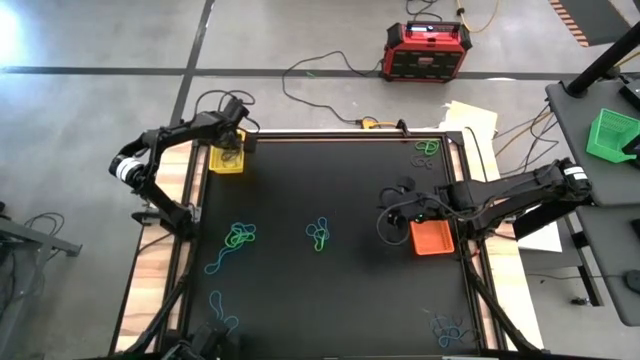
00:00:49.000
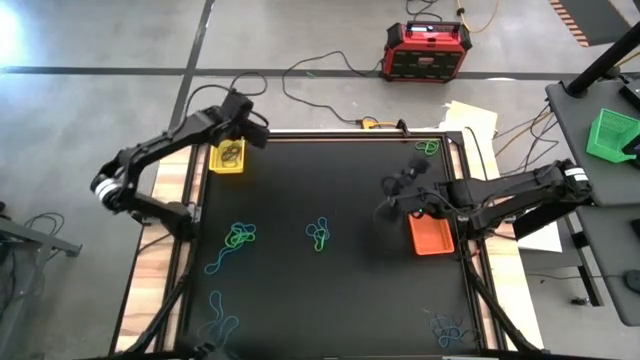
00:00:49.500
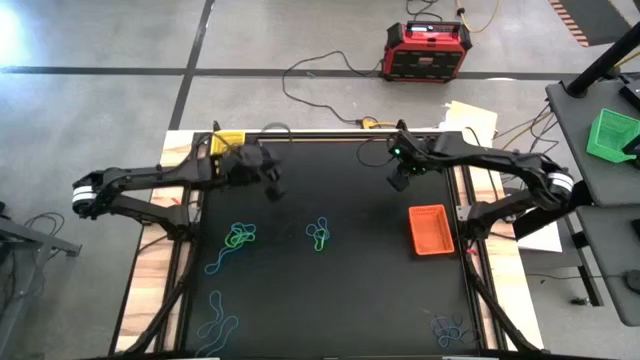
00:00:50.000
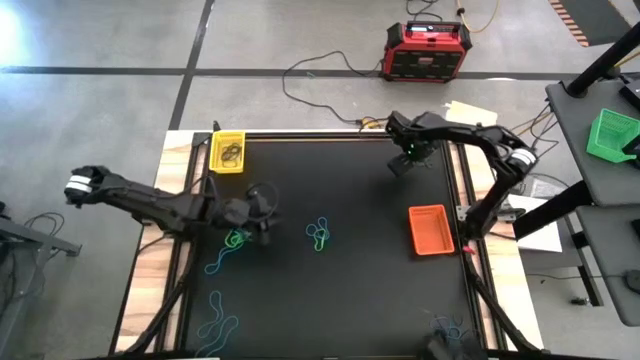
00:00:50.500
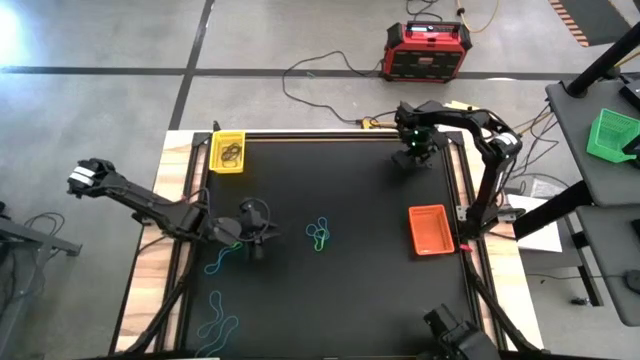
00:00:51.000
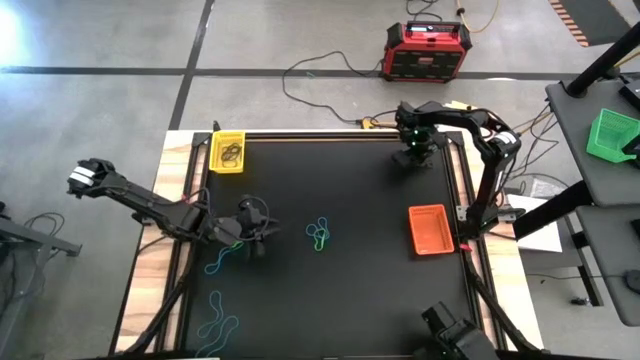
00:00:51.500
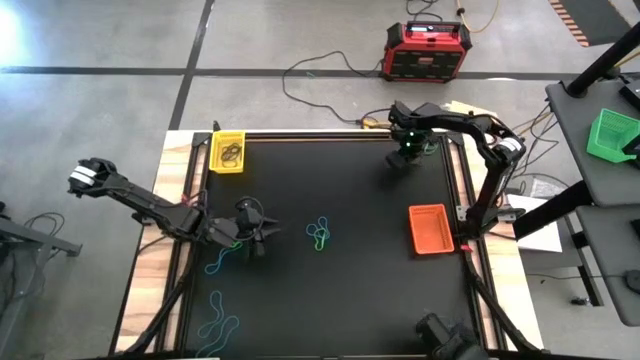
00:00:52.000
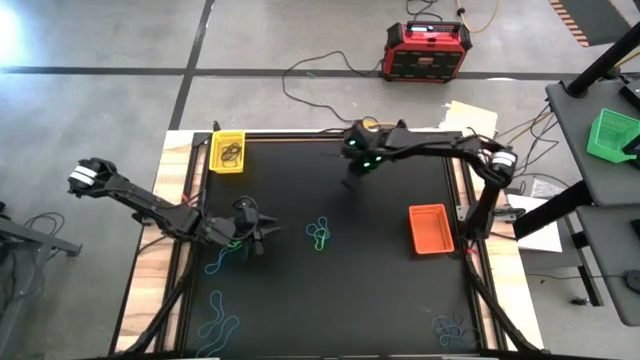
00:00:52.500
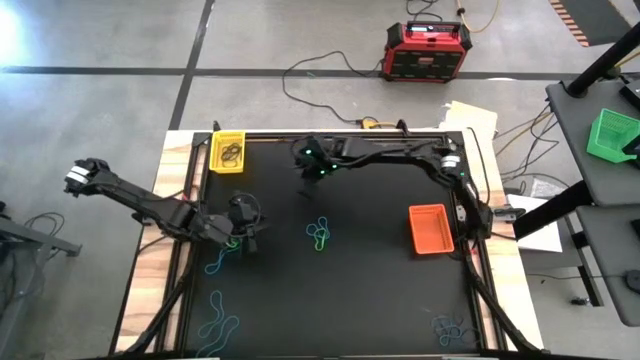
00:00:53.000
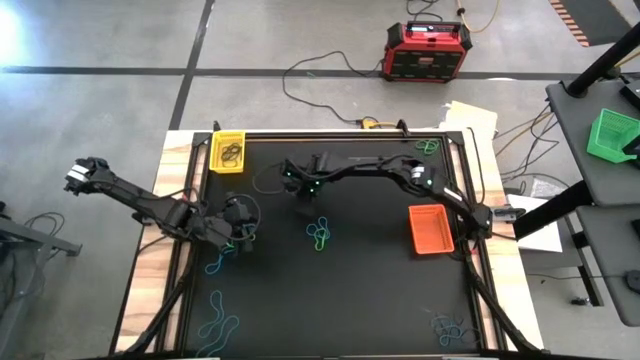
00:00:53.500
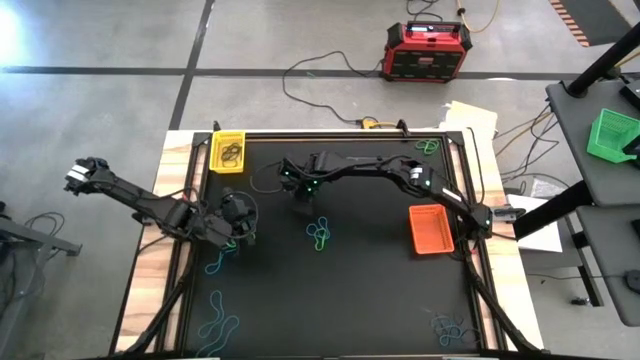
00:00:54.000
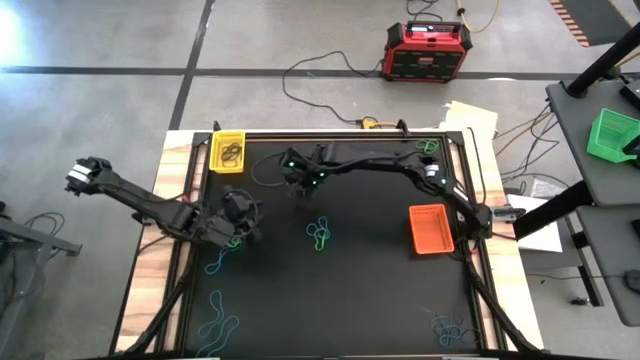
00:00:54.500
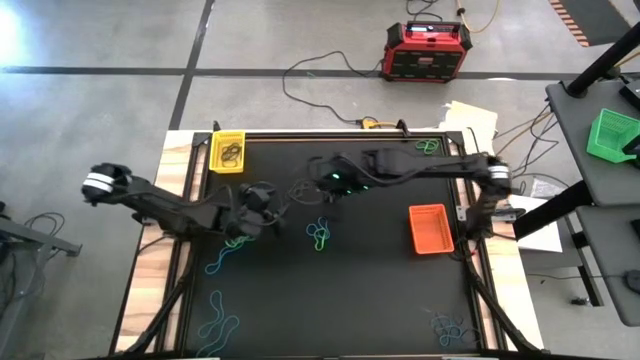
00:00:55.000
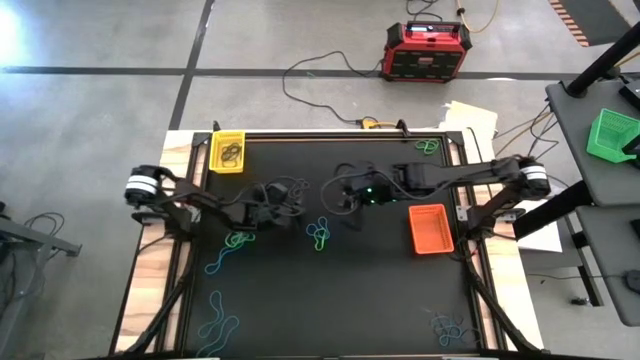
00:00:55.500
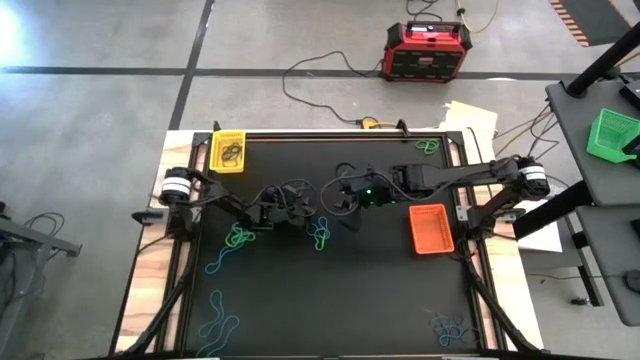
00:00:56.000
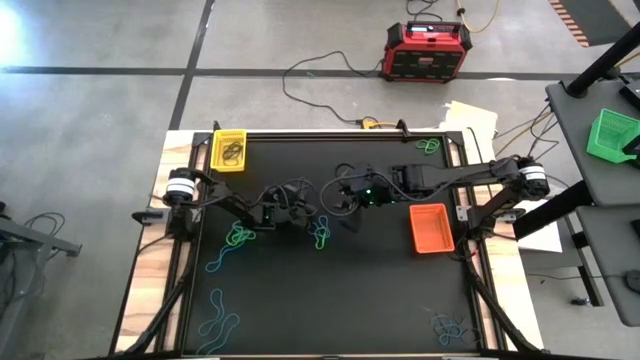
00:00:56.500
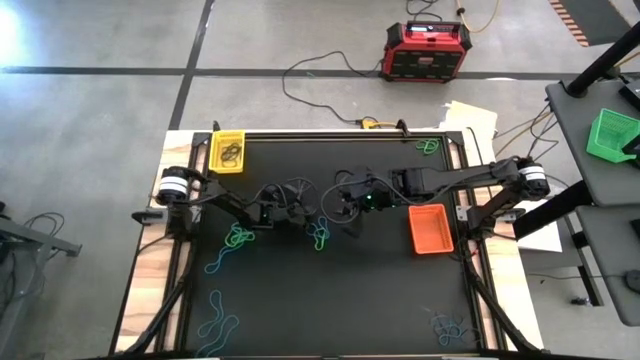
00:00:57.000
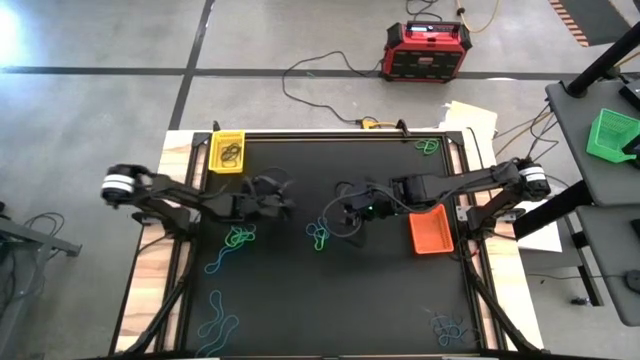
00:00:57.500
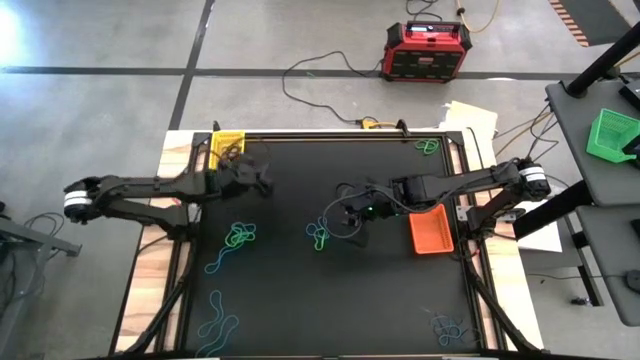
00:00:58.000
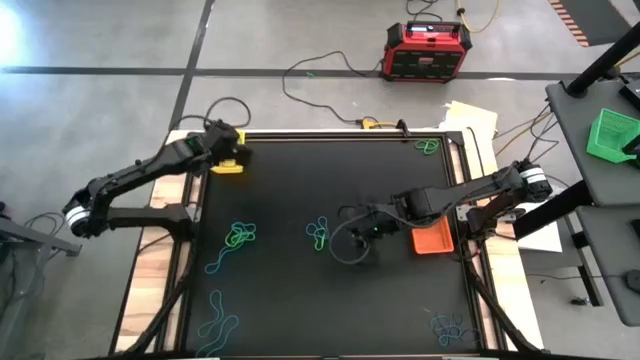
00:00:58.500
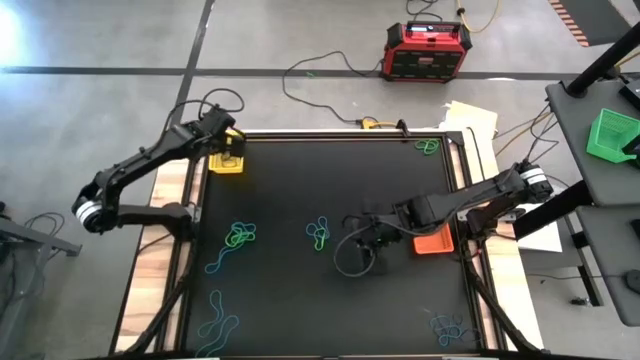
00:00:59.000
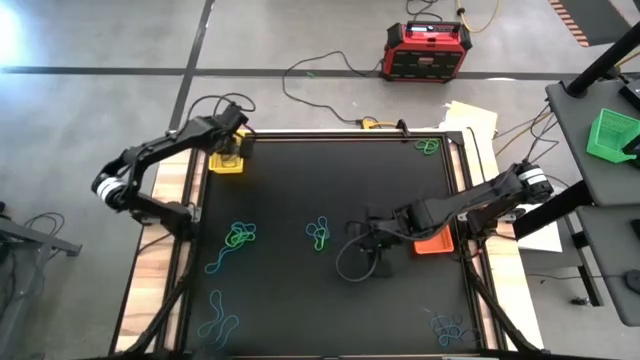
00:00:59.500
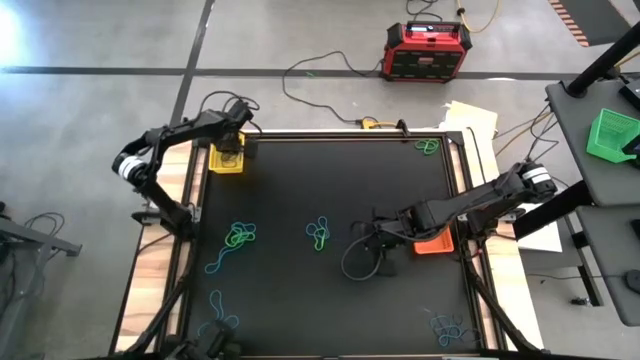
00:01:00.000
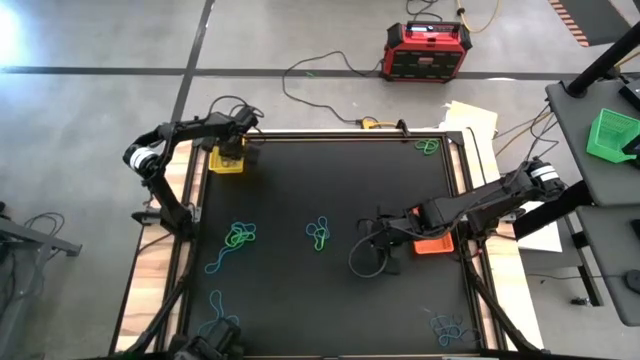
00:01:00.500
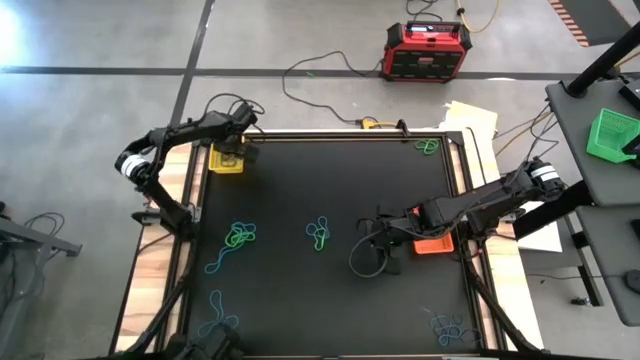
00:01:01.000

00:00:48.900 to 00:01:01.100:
Task: Sort rubber bands into baskets
Put the purple rubber band into the yellow bin

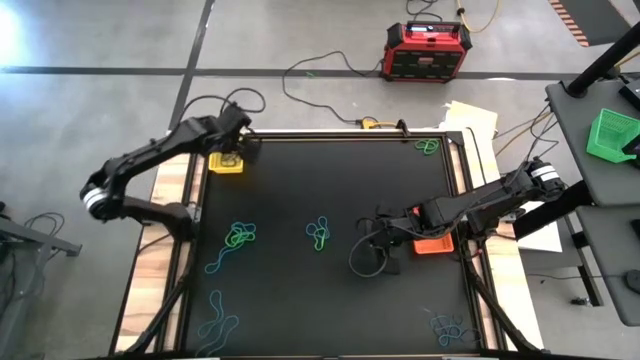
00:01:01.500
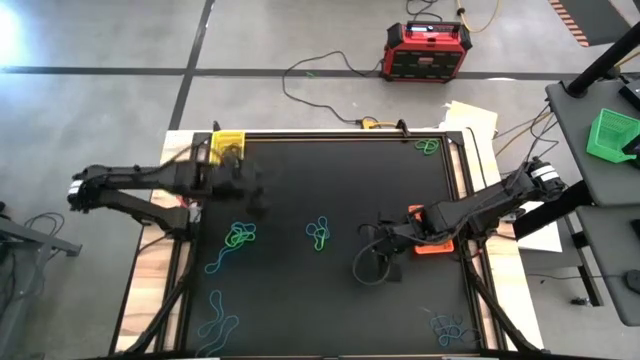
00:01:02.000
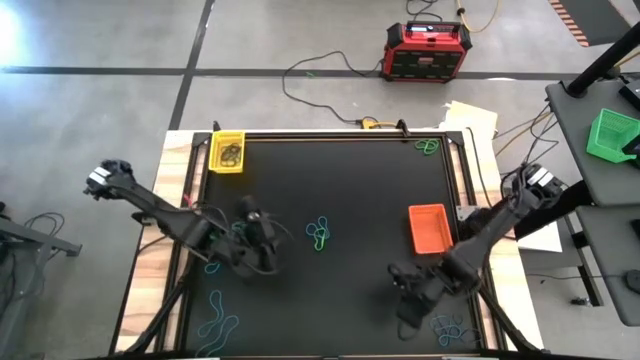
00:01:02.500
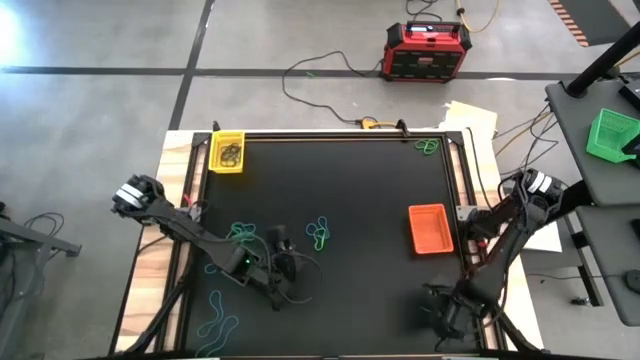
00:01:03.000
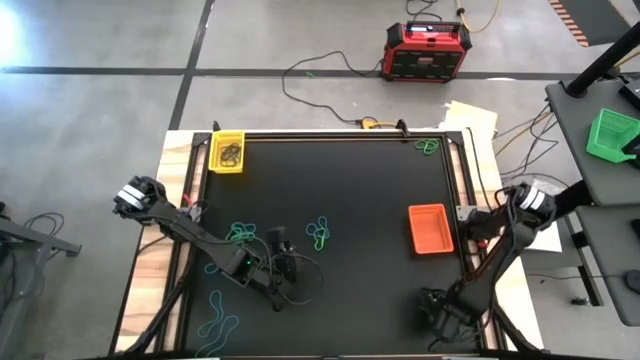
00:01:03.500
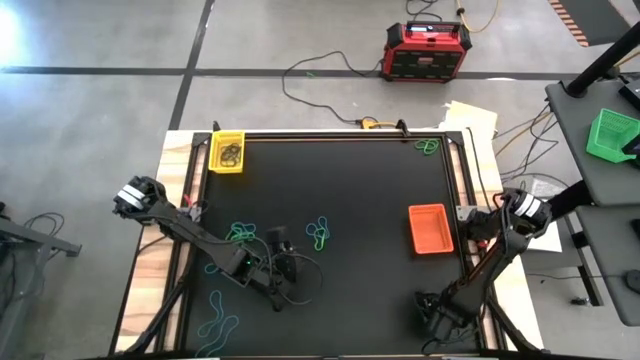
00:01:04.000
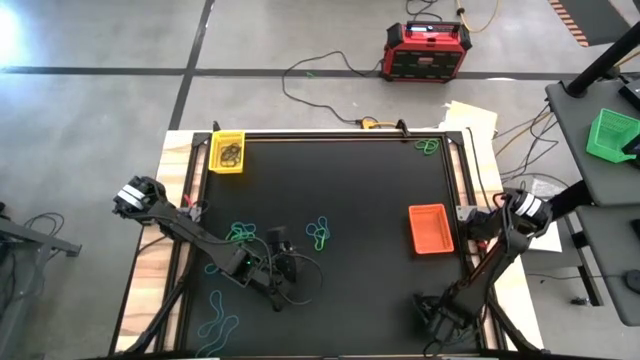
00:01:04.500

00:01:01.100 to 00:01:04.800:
Put the purple rubber band into the yellow bin

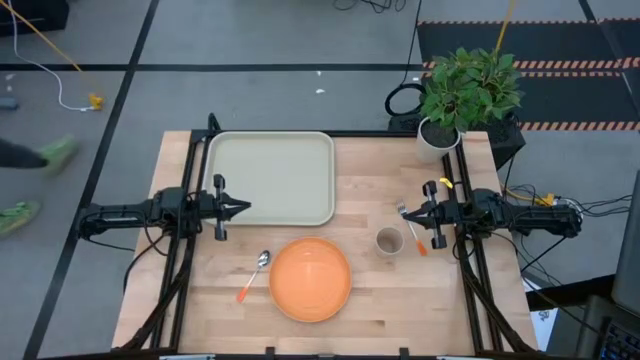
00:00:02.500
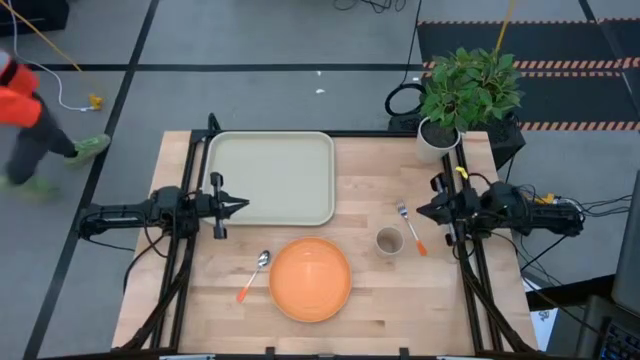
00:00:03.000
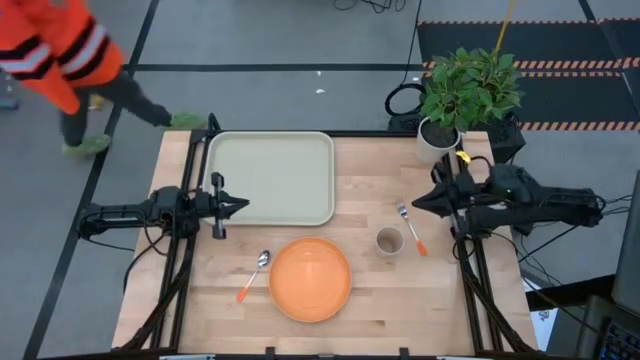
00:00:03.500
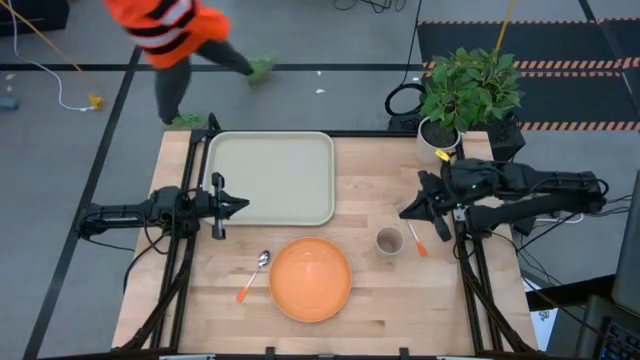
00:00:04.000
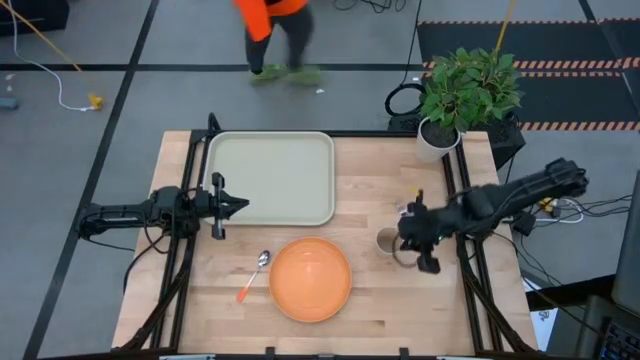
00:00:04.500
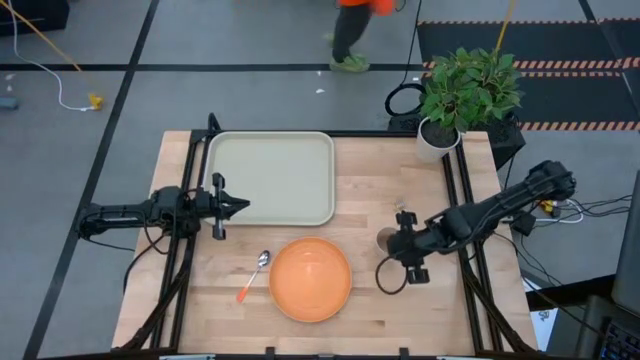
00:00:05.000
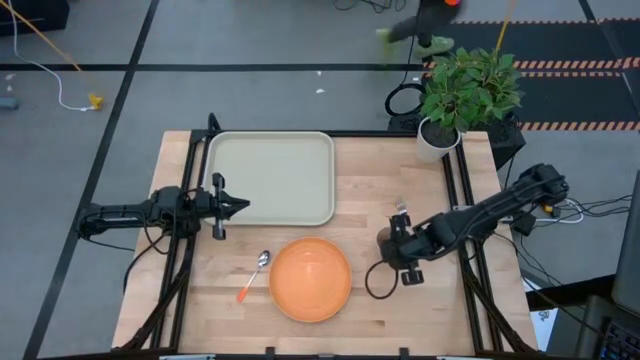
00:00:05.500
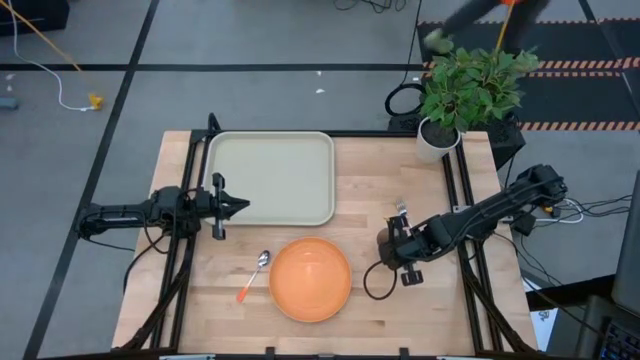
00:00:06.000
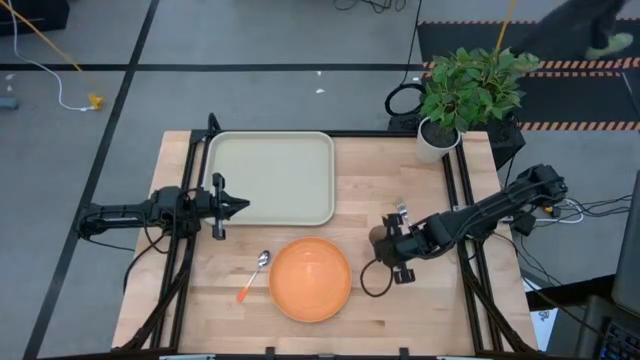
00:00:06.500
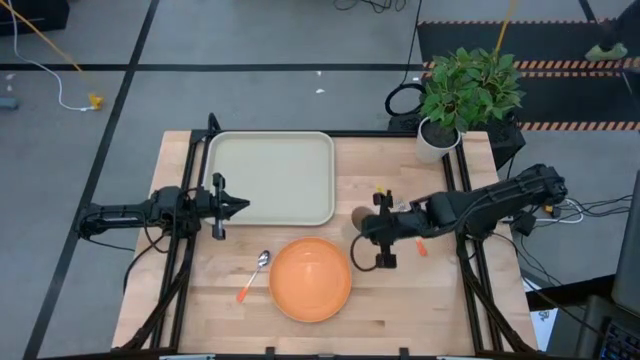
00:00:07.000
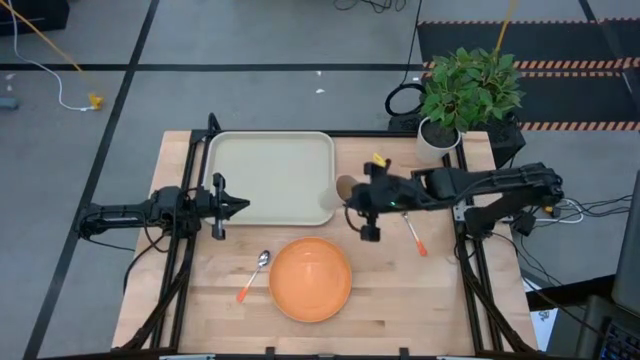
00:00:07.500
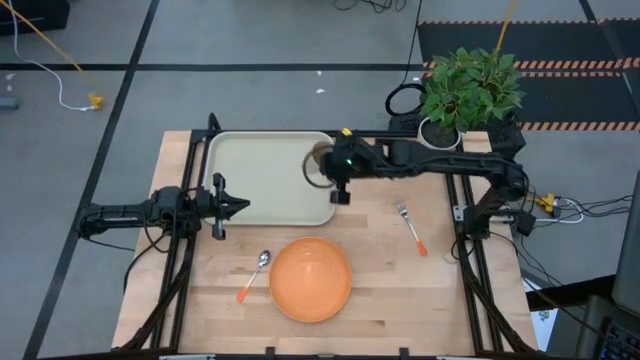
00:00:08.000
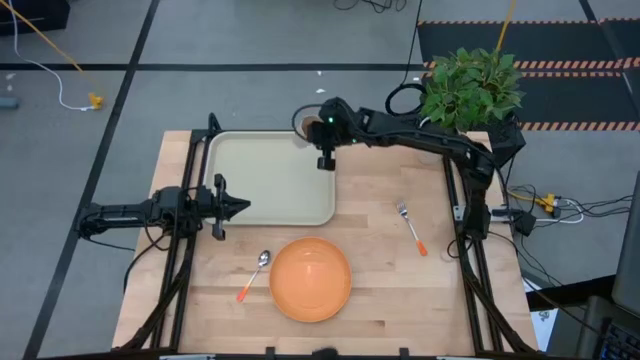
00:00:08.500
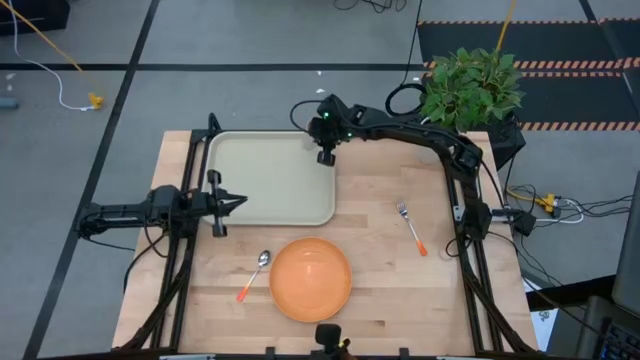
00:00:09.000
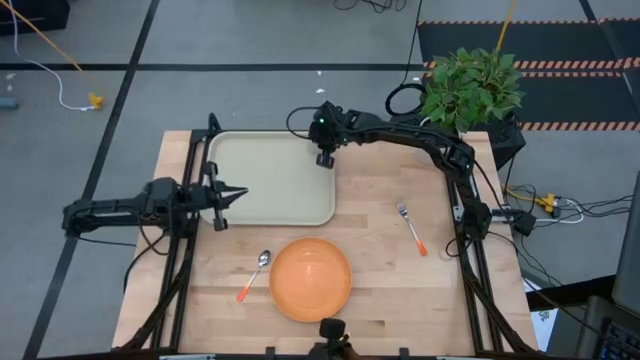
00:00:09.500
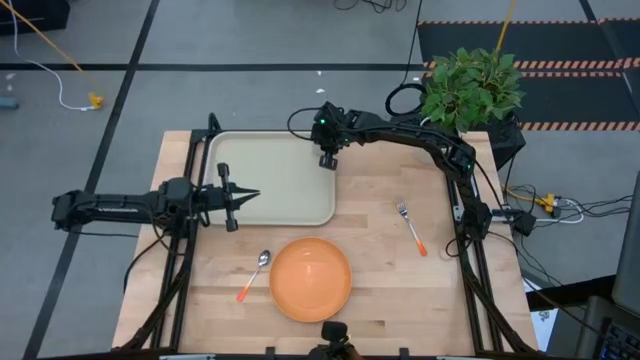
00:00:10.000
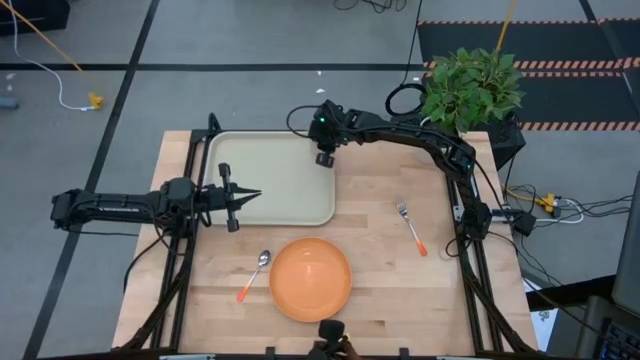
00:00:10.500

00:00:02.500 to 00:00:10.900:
Task: Pick and place plate/cup/fork/spoon on tray
Put the white cup on the top right of the white serving tray
